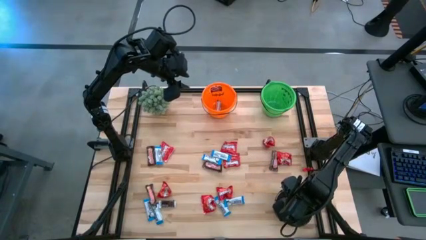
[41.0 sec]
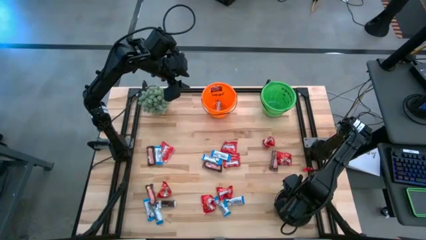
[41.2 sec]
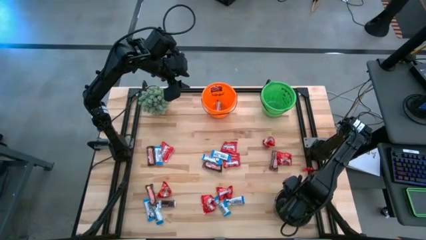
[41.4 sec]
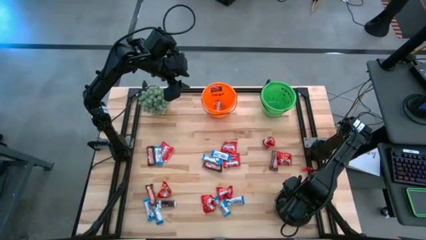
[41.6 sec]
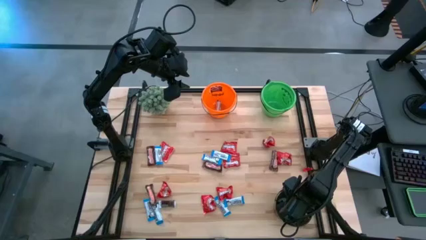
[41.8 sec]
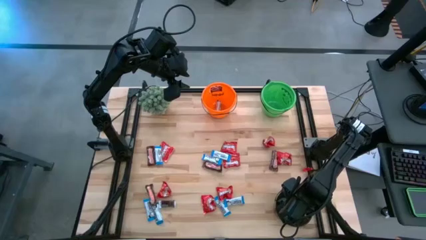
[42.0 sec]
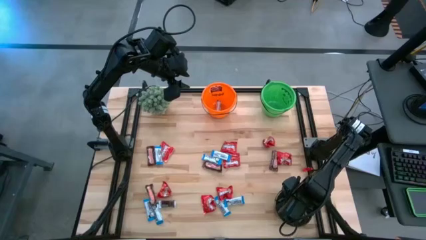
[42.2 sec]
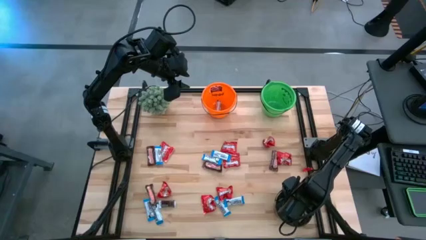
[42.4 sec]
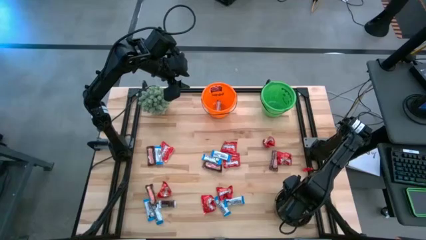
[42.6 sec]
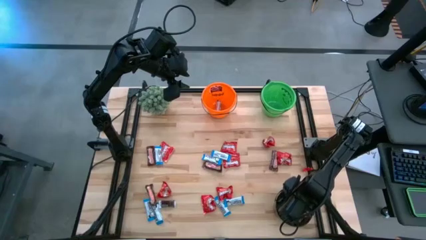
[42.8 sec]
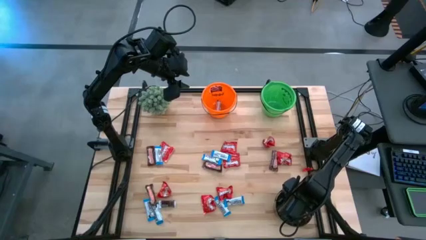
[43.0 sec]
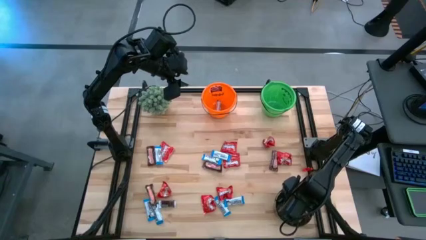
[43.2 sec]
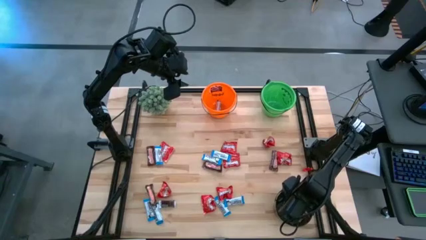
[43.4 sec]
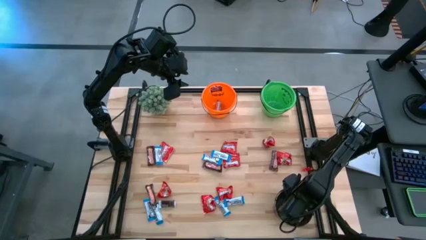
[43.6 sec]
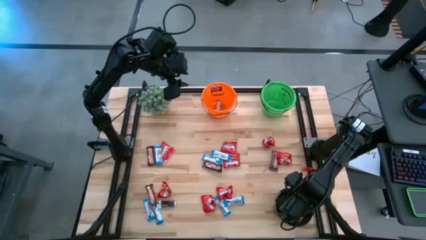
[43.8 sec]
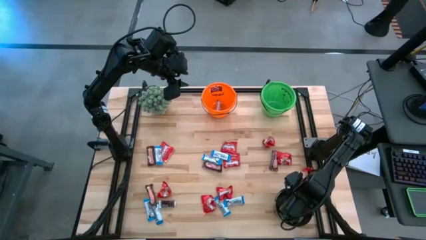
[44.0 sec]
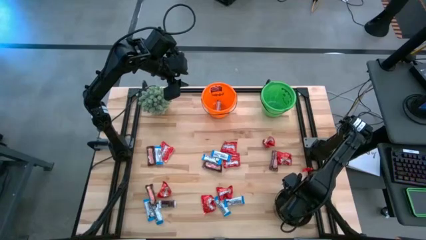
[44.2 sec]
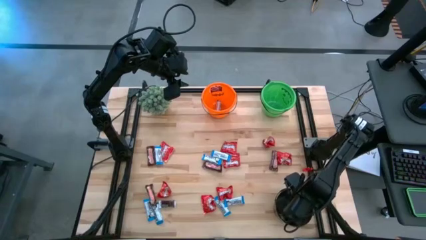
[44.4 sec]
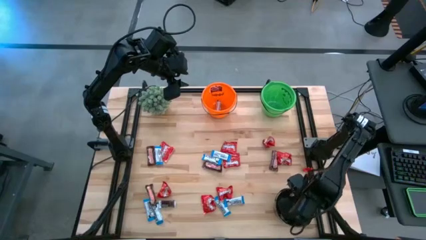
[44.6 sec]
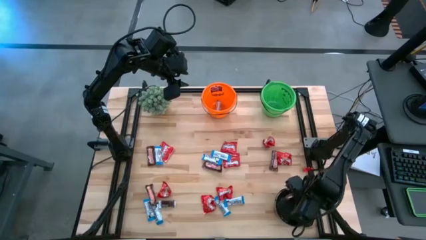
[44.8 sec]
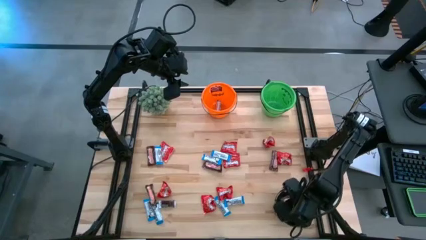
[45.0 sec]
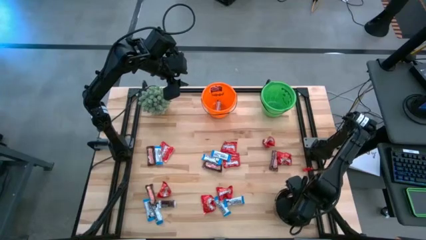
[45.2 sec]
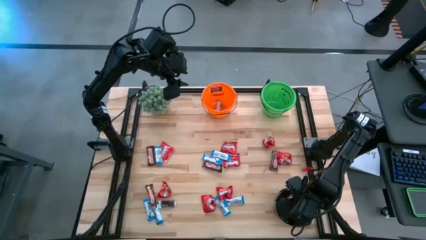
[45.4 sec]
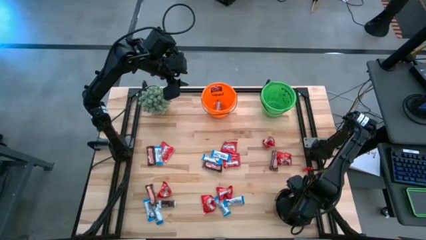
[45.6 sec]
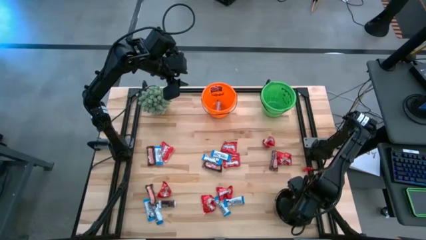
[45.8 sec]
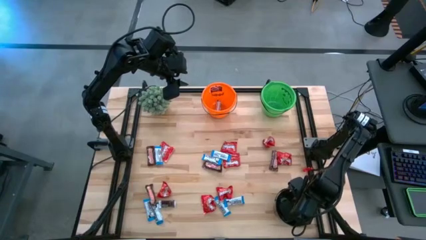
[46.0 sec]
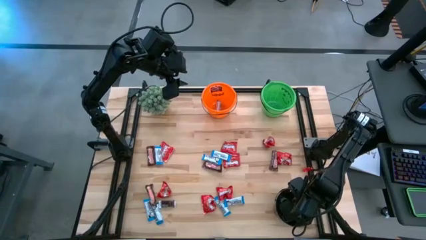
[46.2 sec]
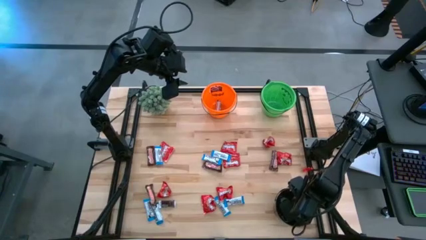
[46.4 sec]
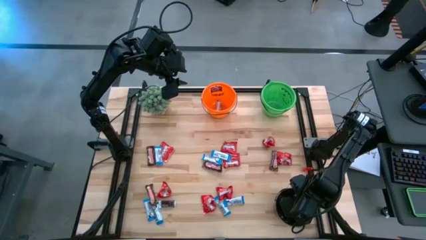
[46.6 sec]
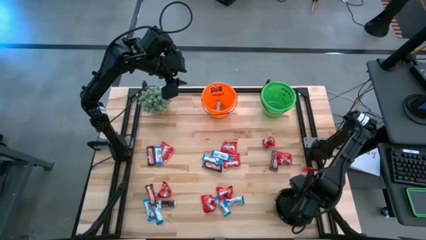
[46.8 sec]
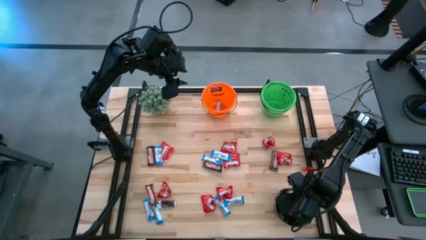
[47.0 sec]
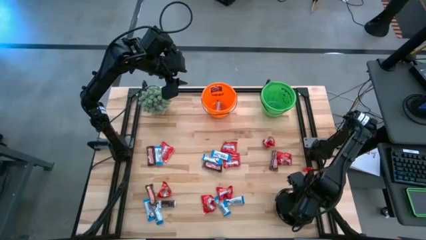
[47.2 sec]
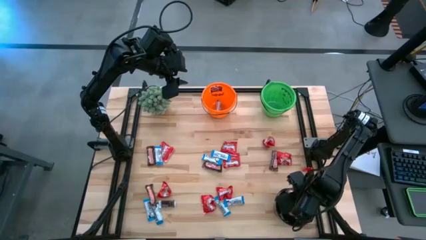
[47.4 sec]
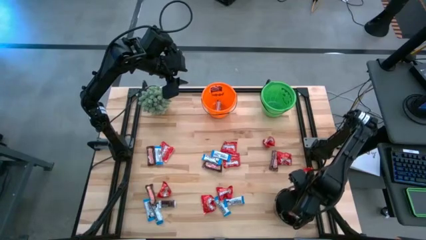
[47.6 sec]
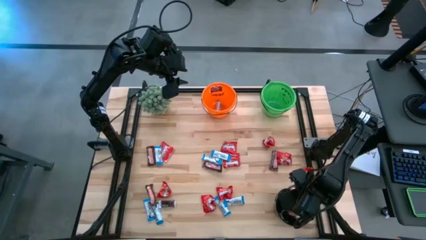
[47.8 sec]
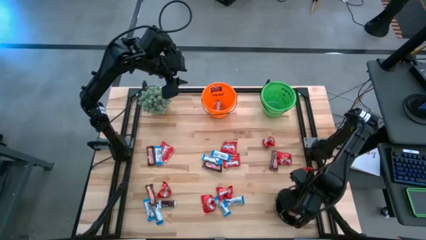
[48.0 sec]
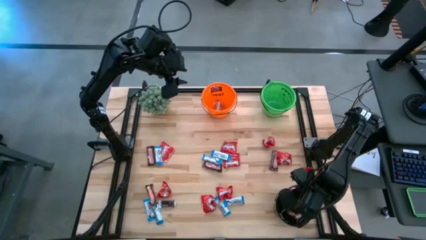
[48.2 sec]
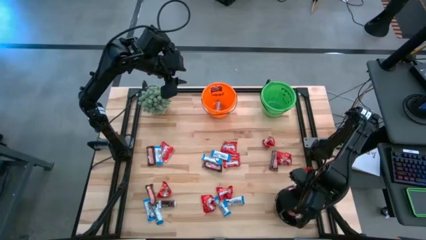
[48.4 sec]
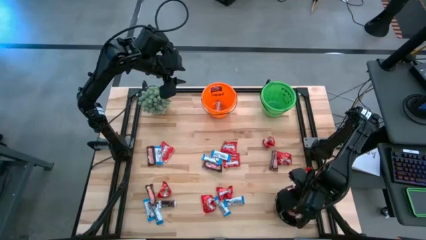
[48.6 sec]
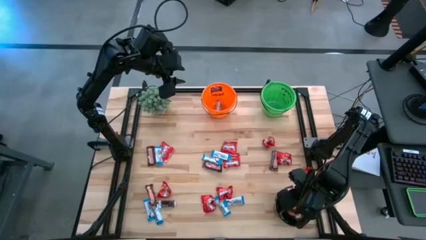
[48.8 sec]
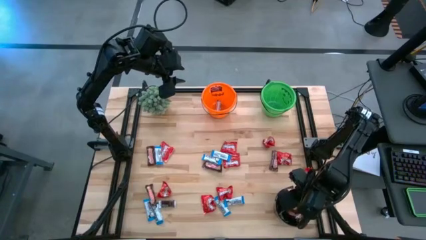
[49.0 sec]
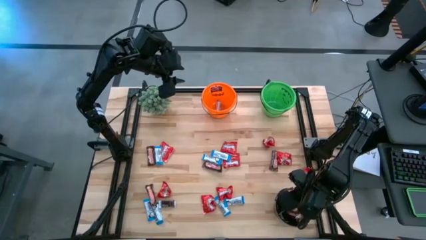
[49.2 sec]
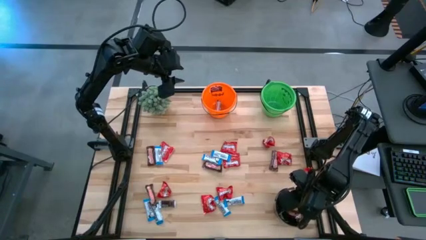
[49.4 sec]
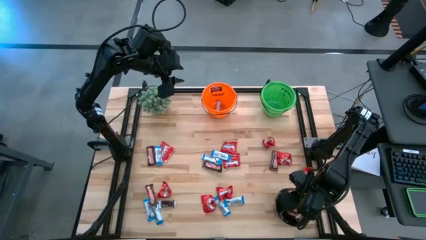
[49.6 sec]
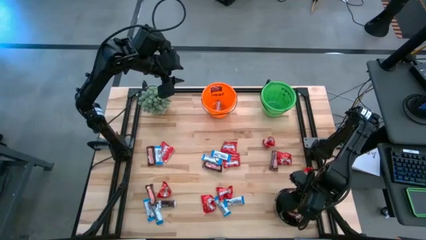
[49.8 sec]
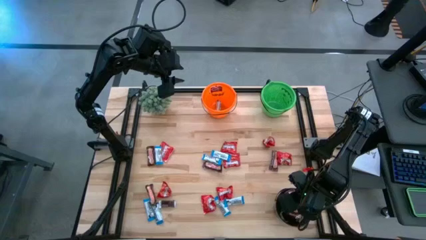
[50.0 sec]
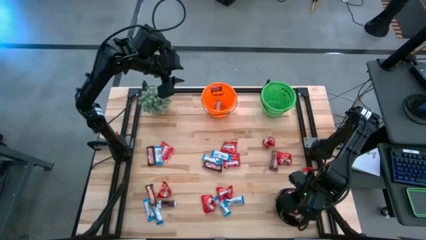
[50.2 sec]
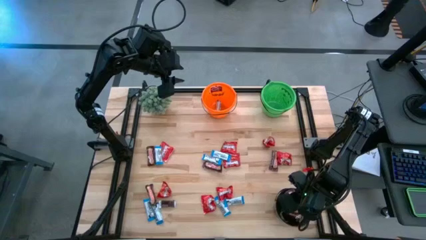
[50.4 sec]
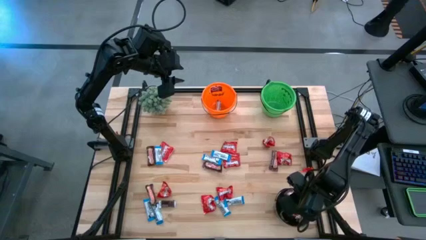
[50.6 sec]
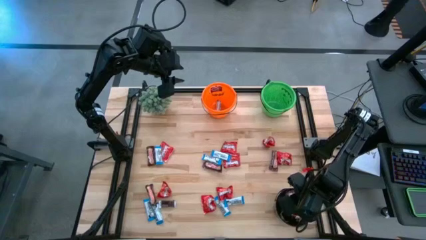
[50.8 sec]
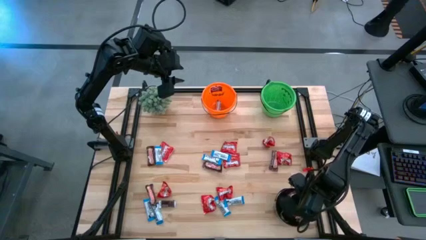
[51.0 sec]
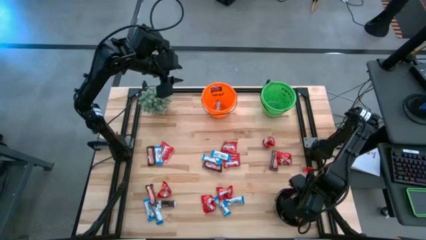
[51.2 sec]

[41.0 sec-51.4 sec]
Task: Organize candy in baskets
Put the brown chocolate bar into the black bucket
